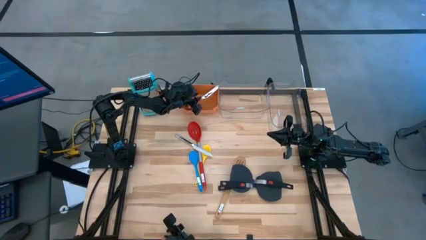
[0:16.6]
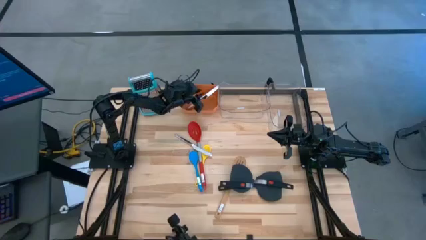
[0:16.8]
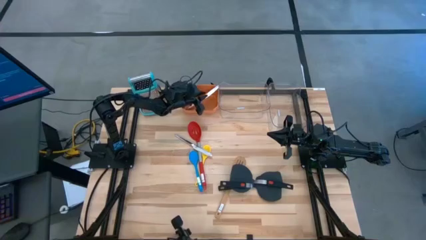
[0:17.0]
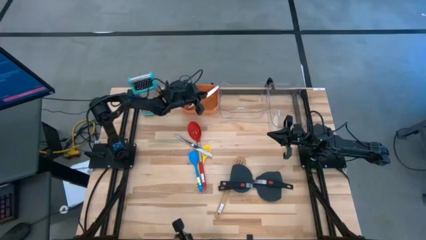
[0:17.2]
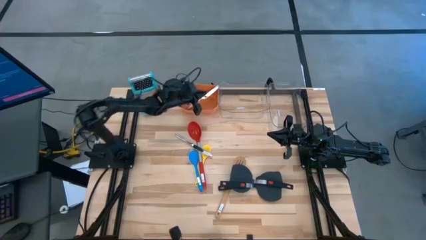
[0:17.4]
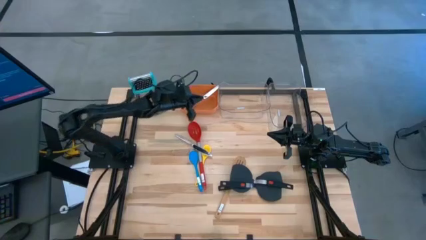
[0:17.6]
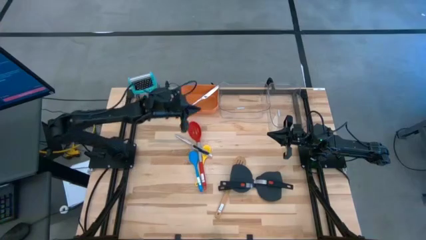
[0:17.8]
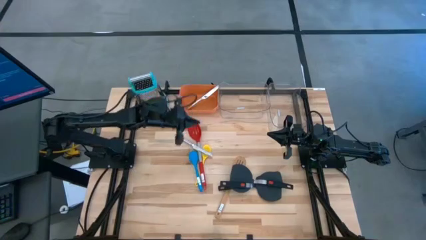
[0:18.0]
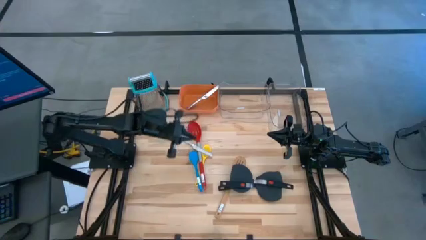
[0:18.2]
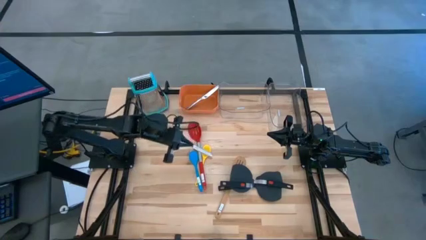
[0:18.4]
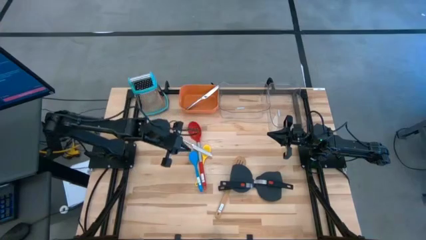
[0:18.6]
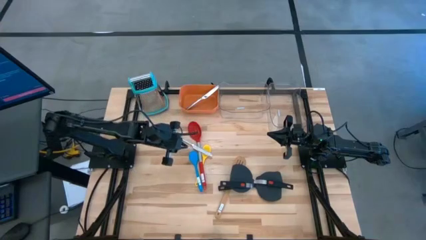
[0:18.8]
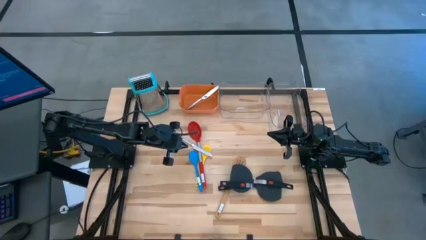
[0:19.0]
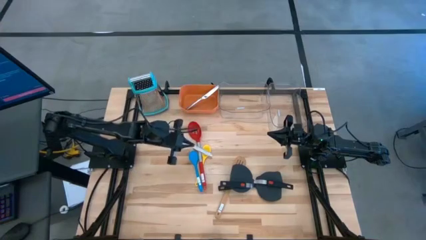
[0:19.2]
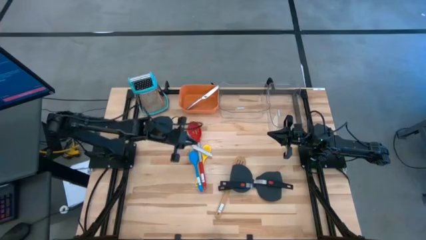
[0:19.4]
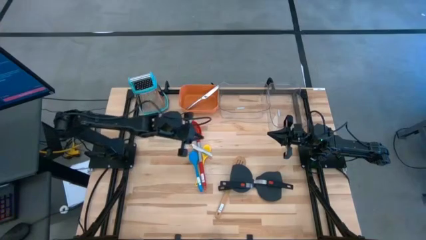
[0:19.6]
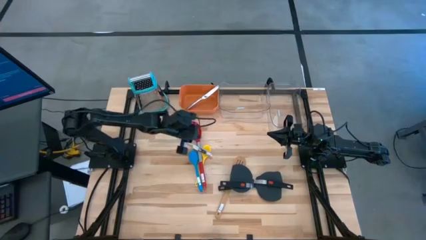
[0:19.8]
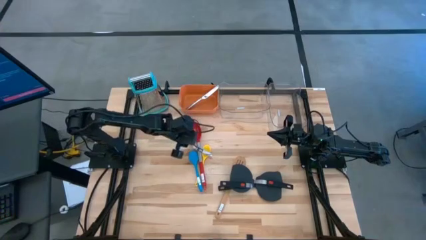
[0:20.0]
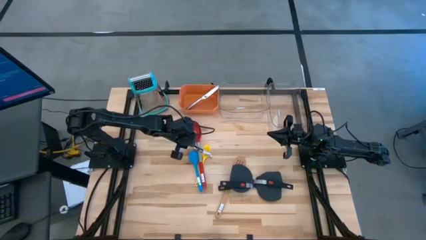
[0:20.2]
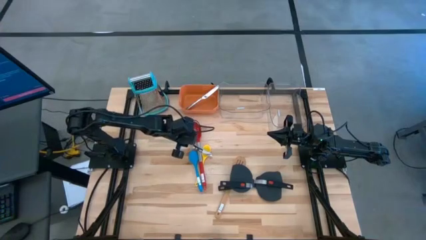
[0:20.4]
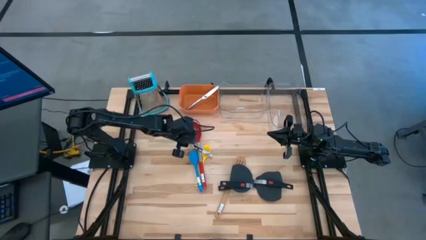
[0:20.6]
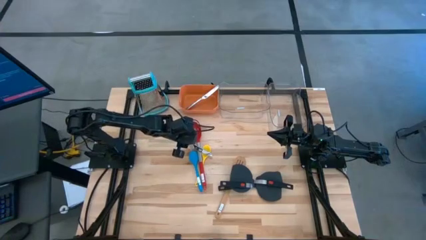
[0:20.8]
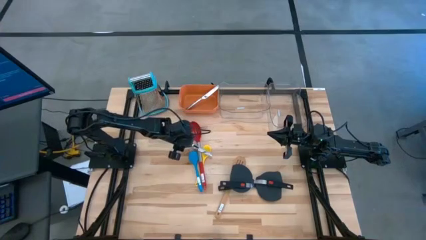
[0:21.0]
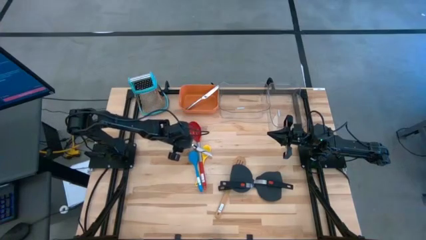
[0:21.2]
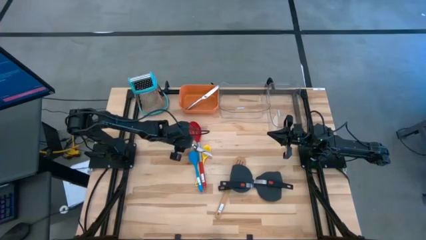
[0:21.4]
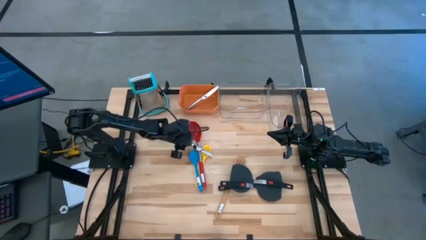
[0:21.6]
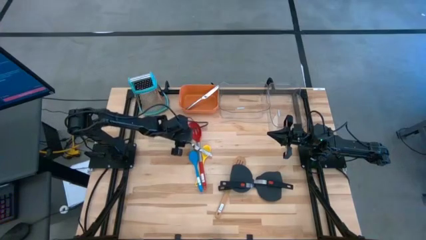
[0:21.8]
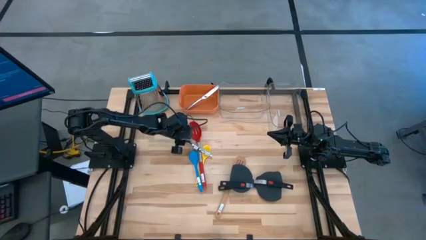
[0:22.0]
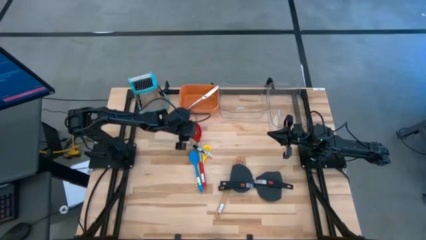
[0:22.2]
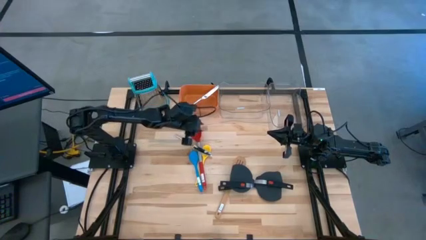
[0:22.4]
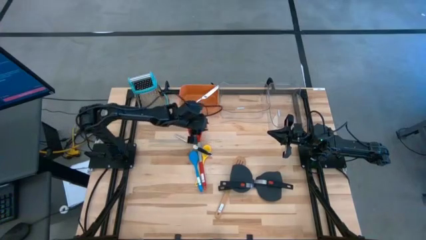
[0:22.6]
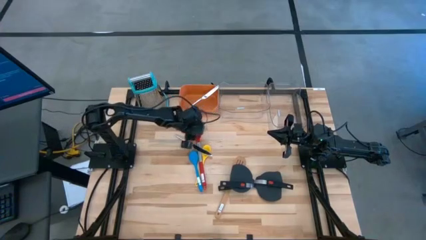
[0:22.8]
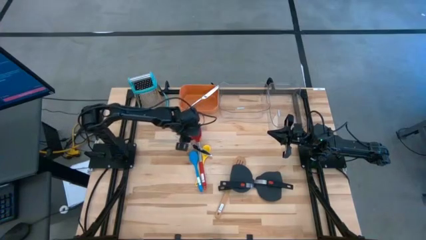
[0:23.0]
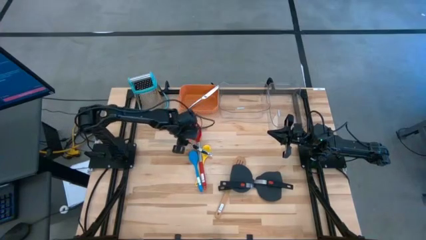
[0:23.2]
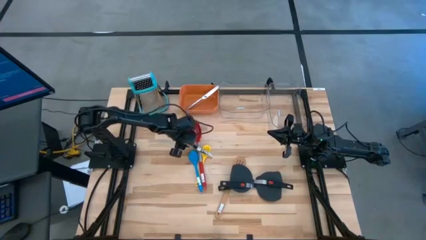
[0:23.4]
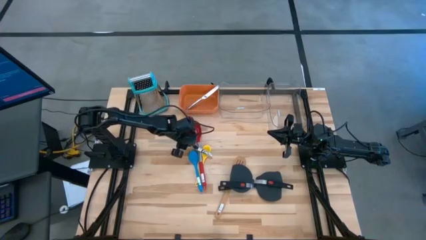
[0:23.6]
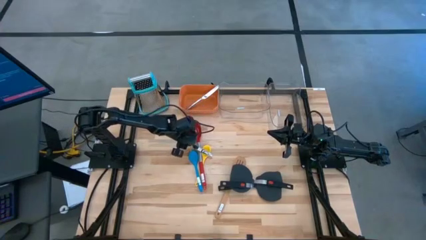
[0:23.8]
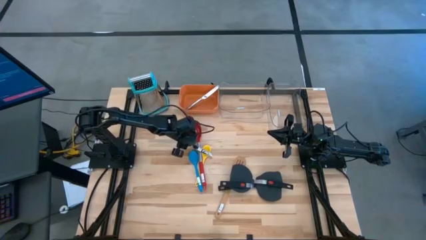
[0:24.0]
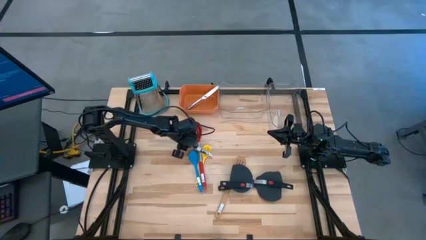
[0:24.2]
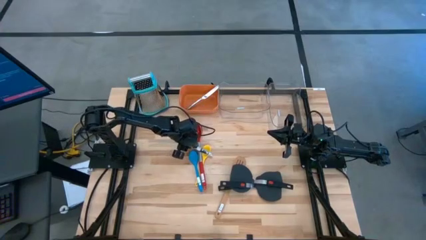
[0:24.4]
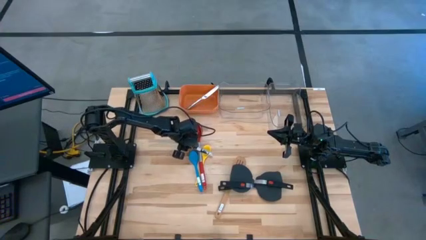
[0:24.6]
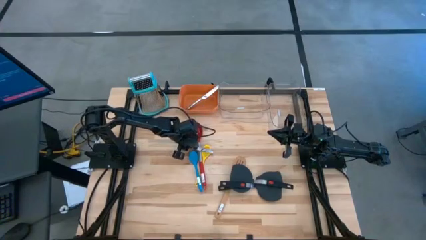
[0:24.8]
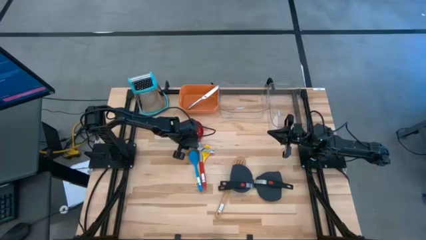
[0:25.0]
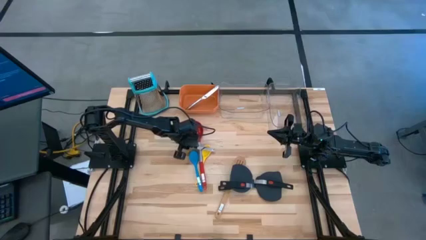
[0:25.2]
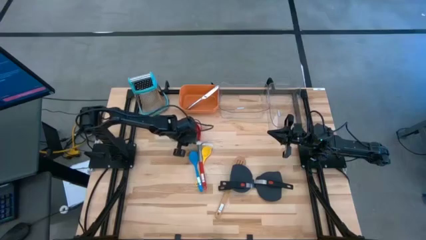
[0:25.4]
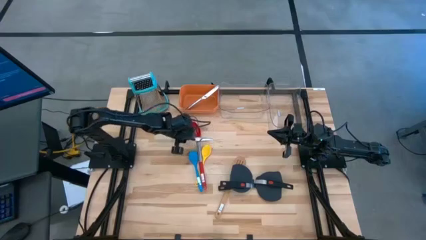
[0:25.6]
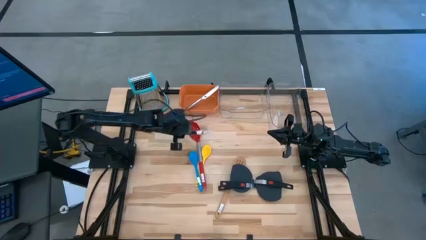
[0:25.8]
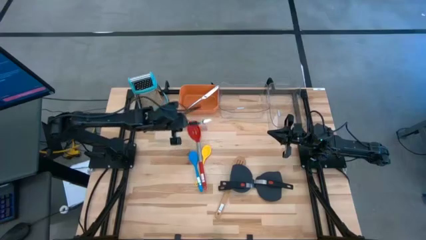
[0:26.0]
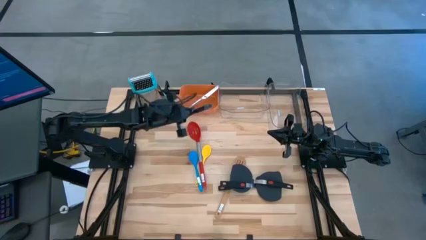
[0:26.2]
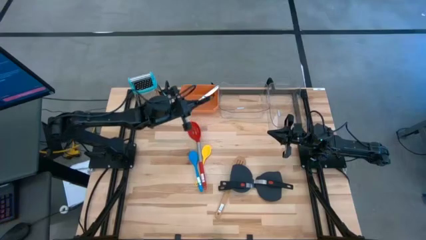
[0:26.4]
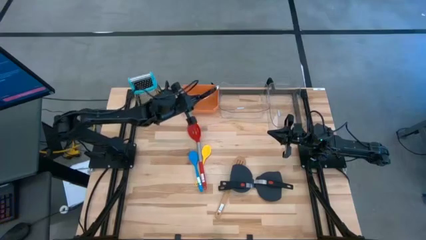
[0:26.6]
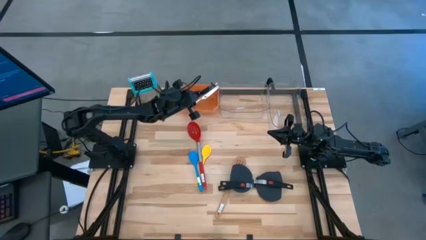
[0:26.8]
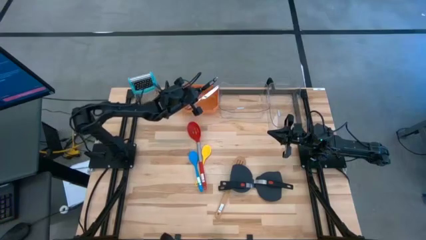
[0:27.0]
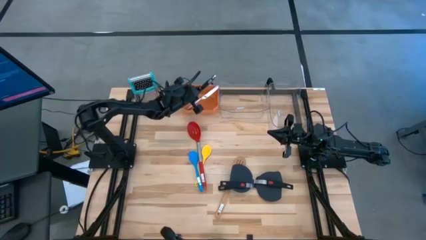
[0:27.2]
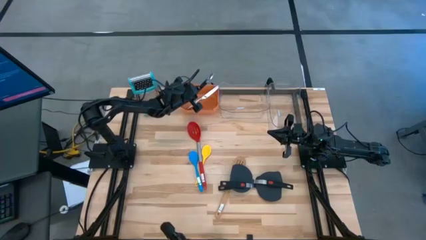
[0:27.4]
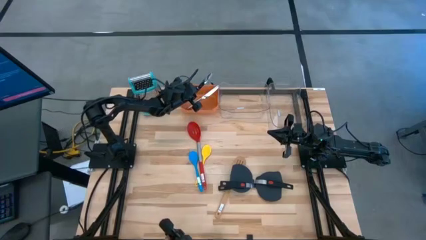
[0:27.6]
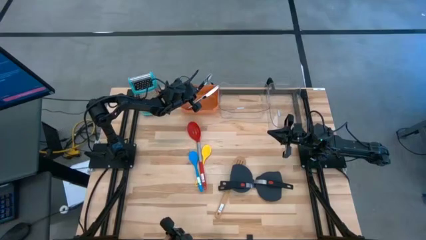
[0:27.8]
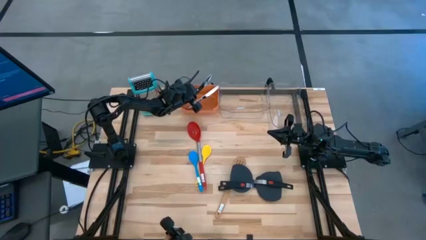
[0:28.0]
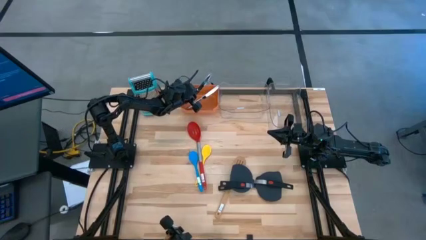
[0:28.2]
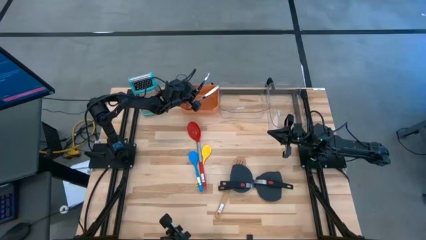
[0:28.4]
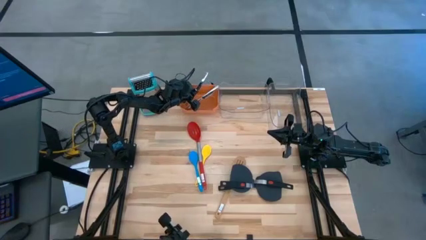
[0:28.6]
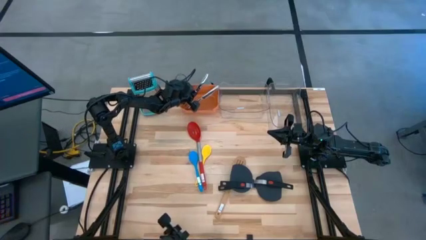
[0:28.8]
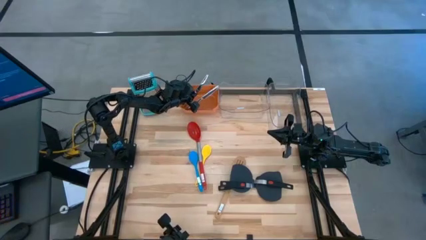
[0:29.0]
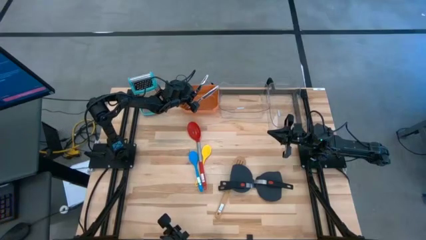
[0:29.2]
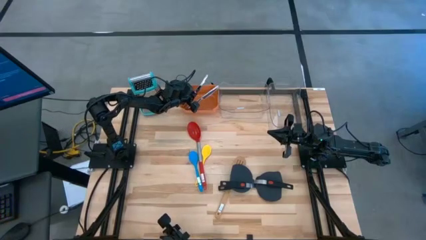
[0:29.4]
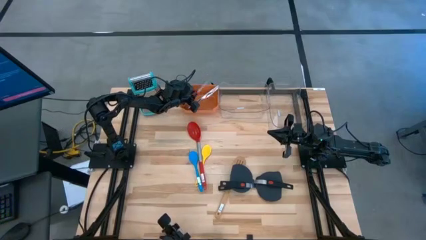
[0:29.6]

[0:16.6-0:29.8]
Task: Pick & Place Kitchen Items
Put the silver knife into the orange bin

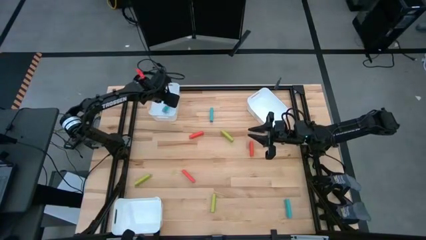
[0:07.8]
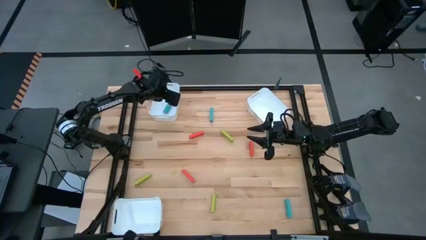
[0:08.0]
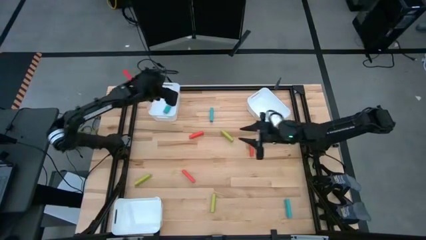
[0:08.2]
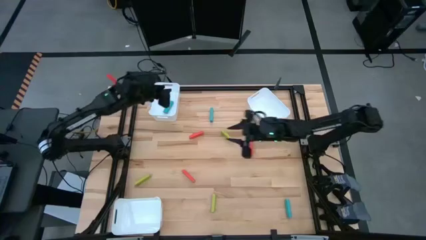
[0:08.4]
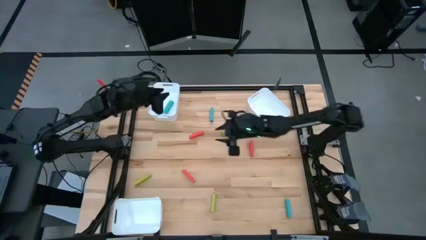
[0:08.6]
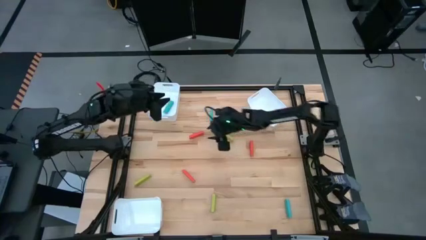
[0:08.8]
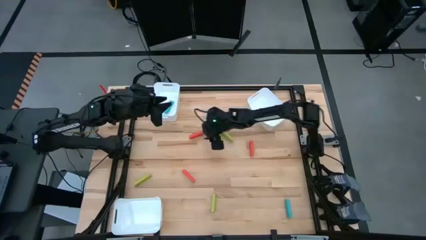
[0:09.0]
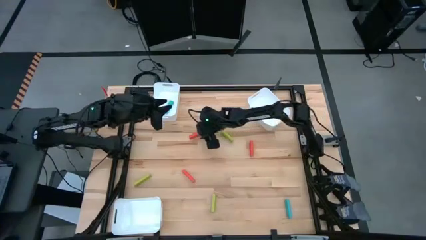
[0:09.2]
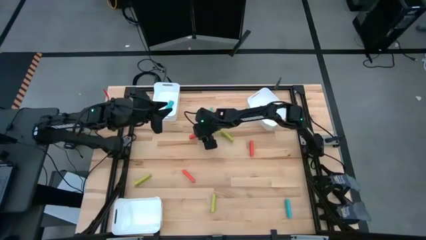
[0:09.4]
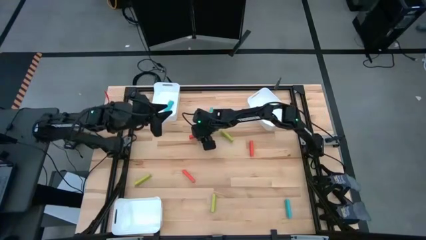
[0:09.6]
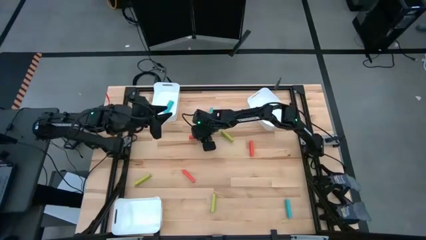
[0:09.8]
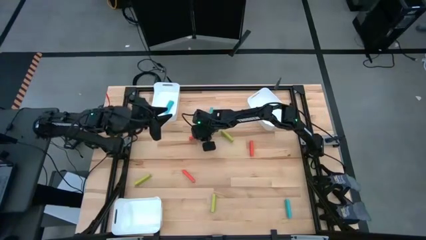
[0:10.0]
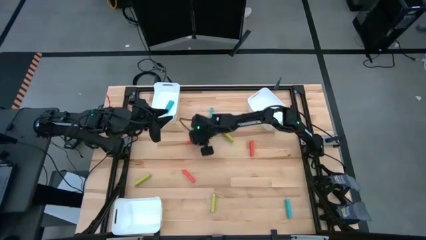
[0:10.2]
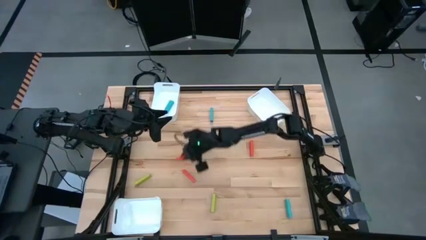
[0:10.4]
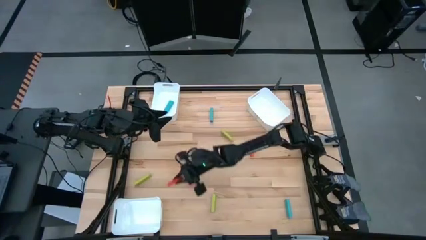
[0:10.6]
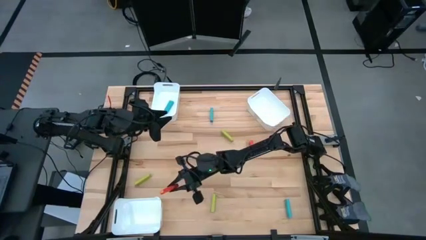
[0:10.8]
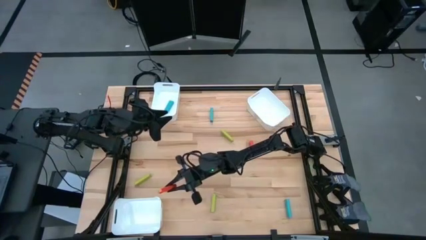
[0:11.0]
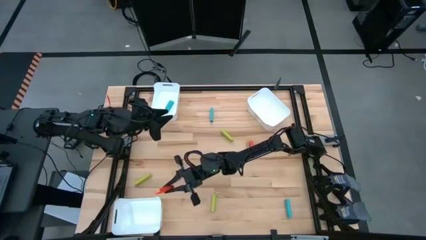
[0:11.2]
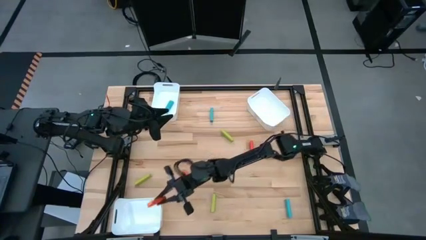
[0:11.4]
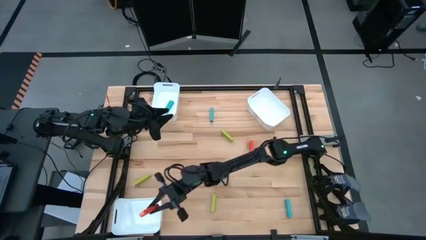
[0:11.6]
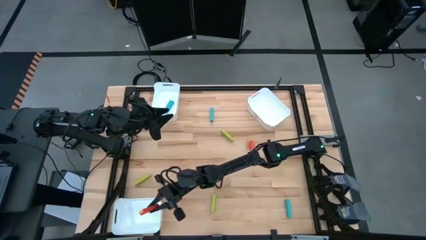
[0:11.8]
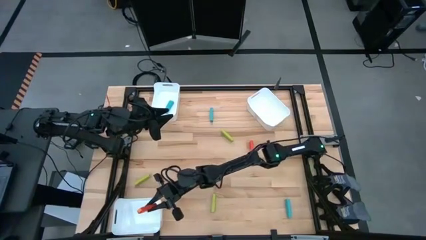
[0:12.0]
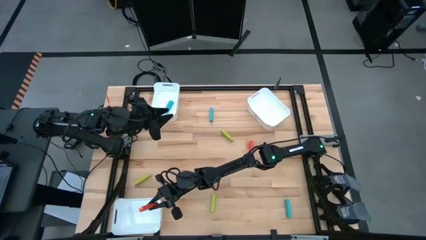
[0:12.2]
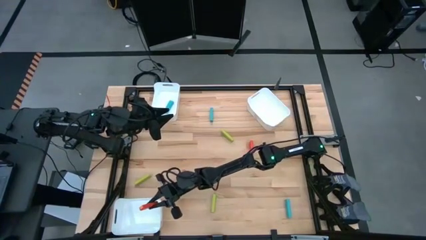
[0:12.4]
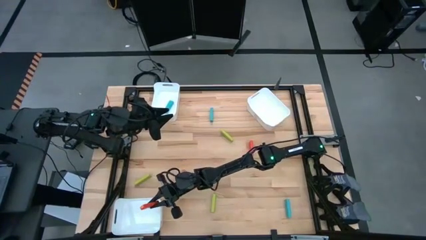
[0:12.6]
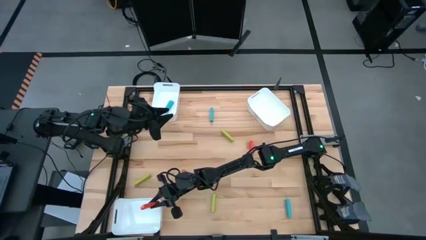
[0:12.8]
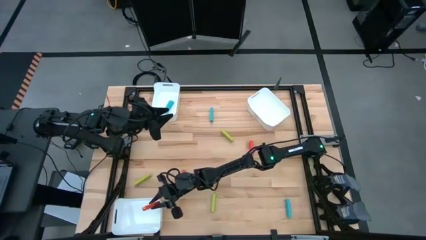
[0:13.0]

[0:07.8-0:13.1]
Task: Sort blocks
Put the top left red block into the bottom left white bin
